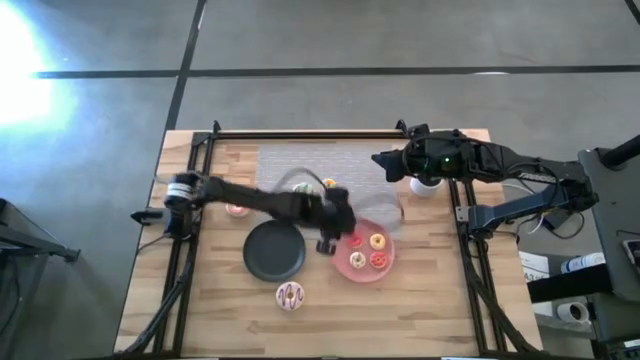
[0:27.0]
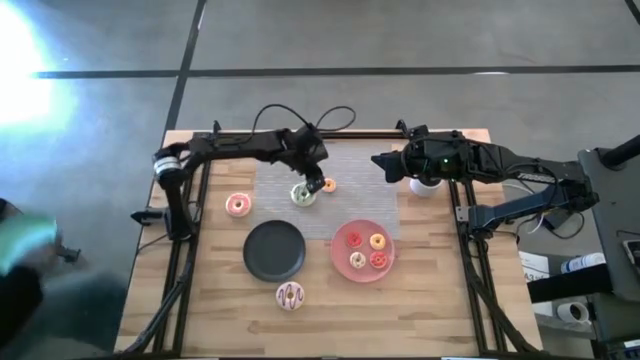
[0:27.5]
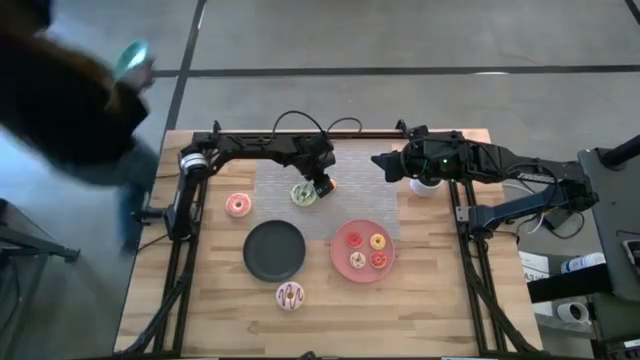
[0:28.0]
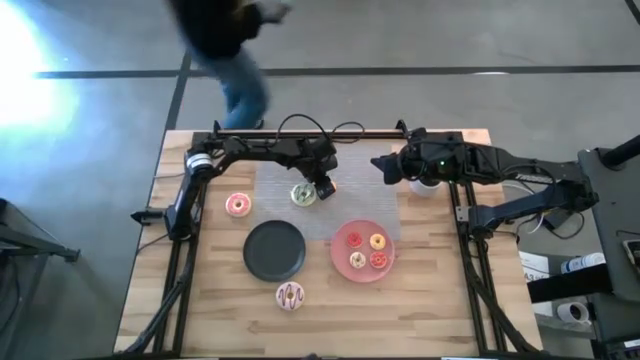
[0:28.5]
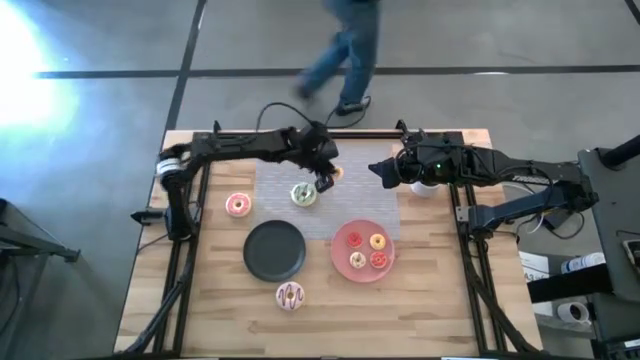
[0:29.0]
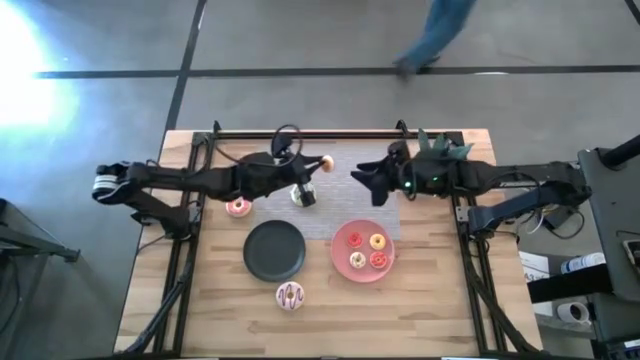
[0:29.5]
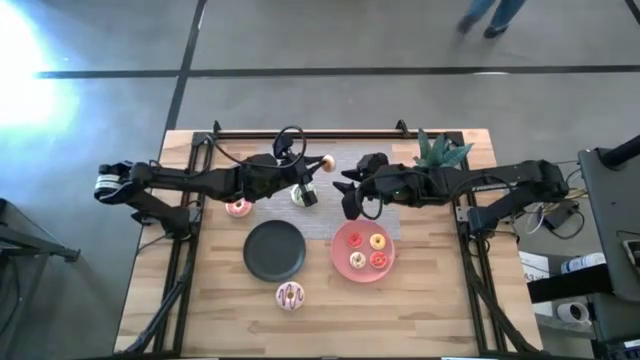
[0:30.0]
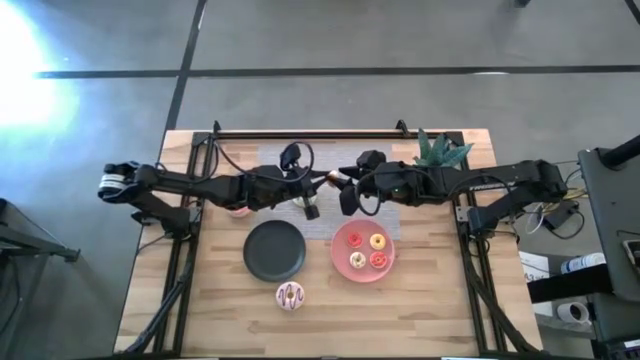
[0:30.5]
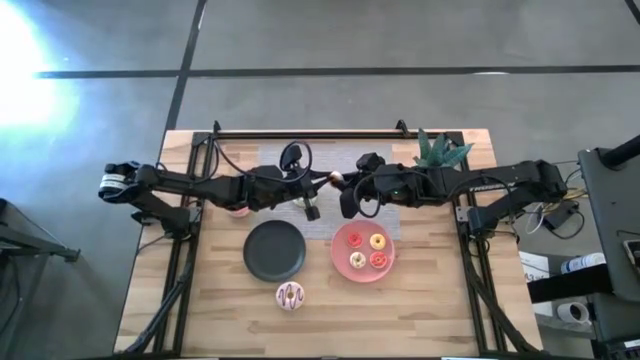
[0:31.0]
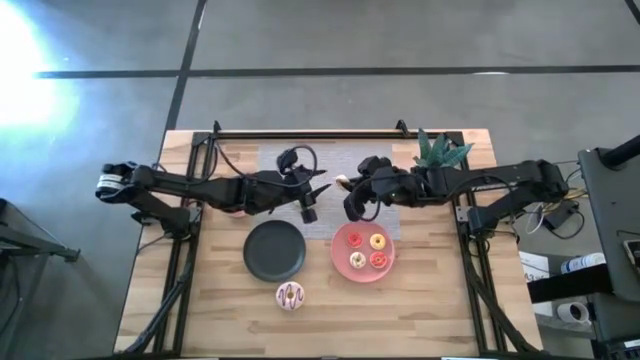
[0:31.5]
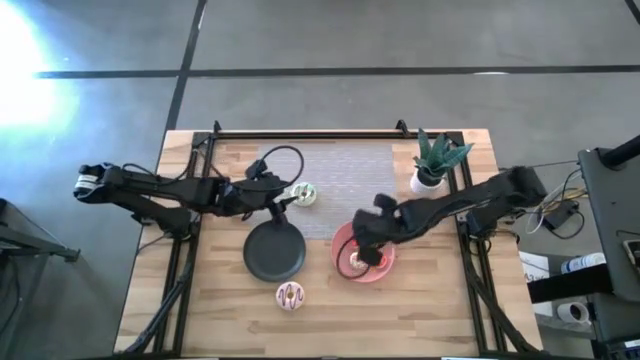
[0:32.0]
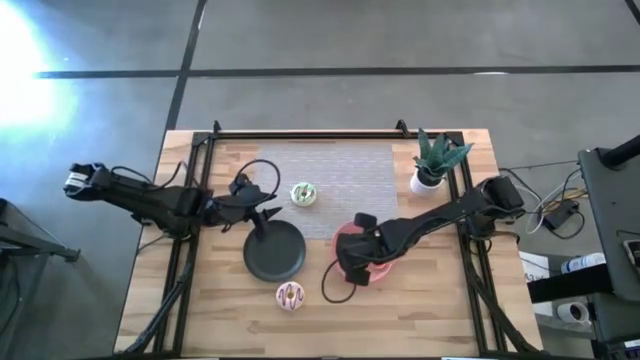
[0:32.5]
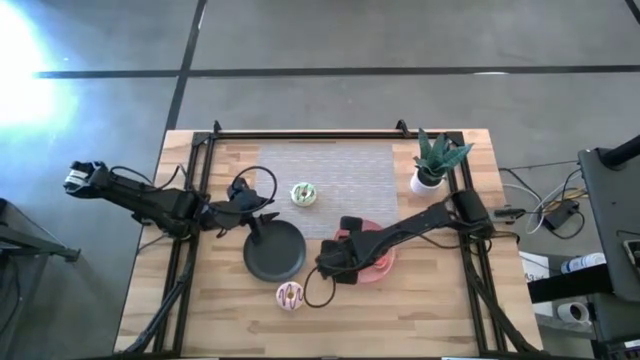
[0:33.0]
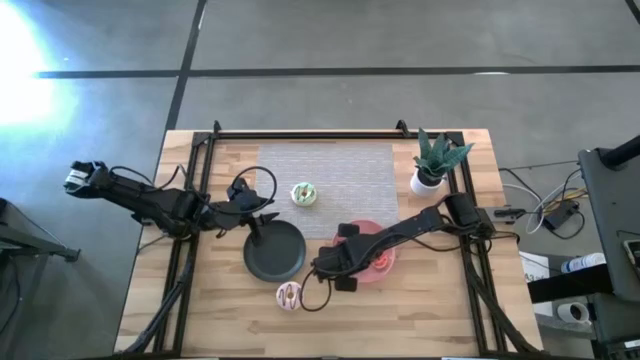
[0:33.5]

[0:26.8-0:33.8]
Task: Pick & Place donuts
Put the small blue donut on the pink plate

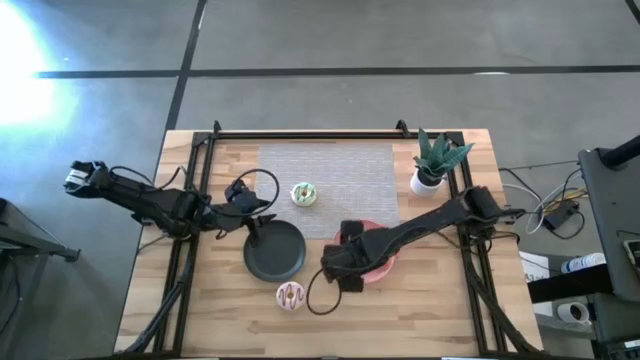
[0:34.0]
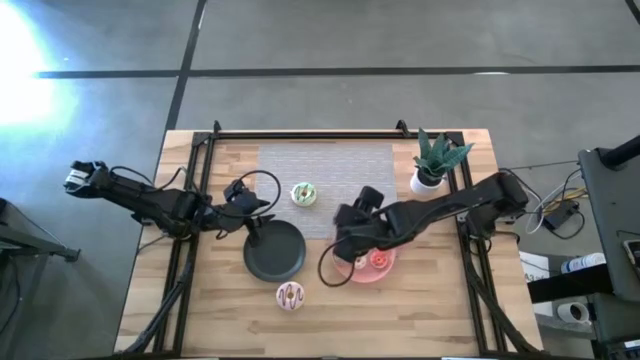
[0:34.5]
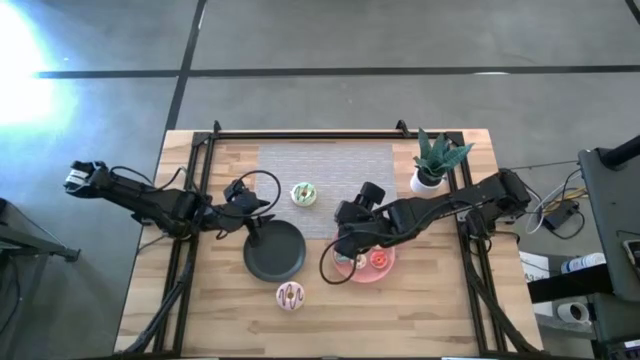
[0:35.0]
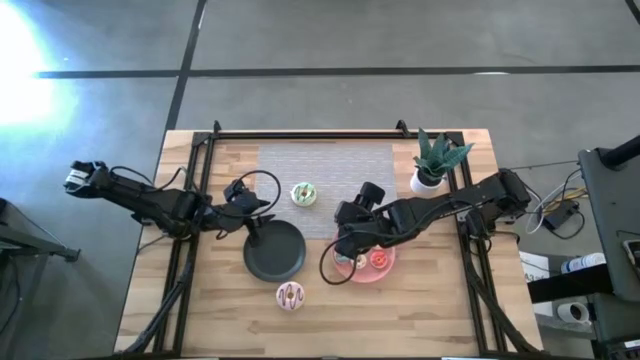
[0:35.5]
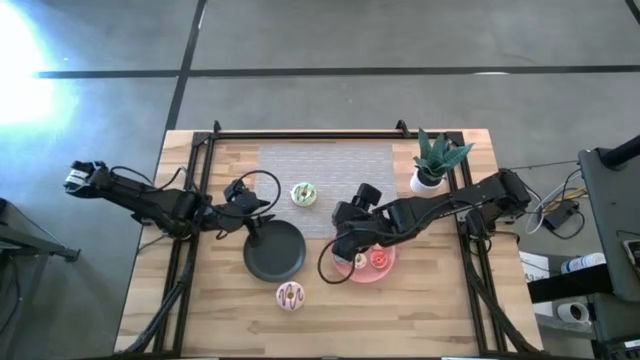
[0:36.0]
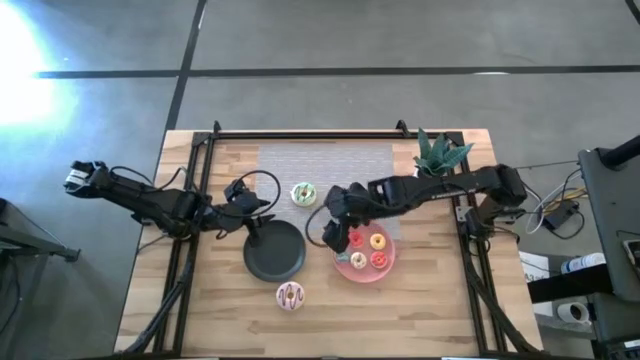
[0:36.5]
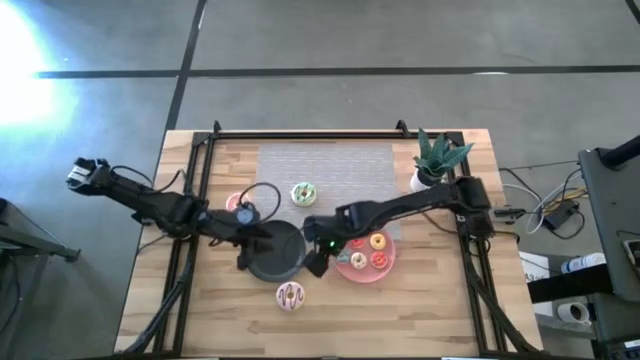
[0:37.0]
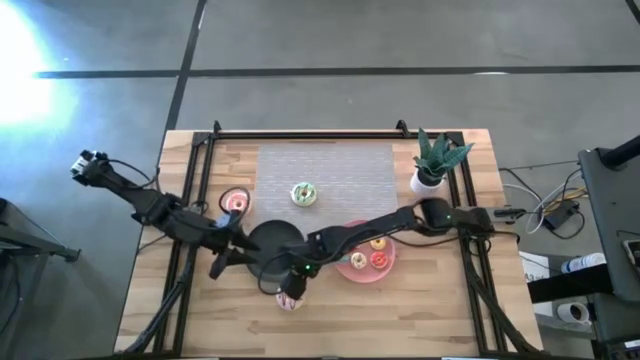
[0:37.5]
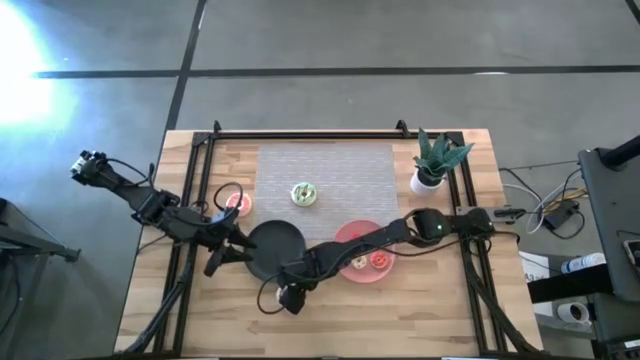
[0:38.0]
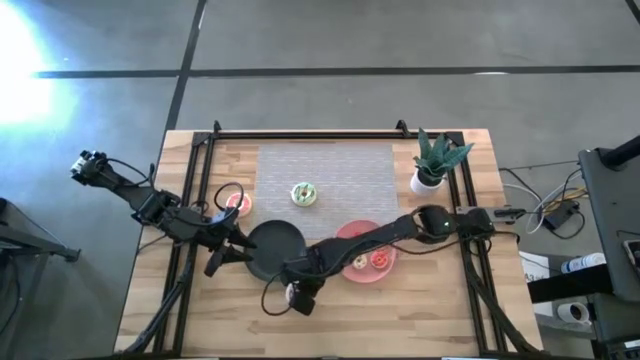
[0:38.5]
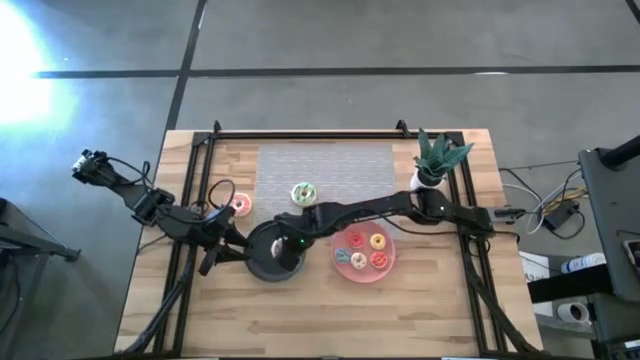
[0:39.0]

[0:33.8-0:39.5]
Put the big violet donut on the black plate

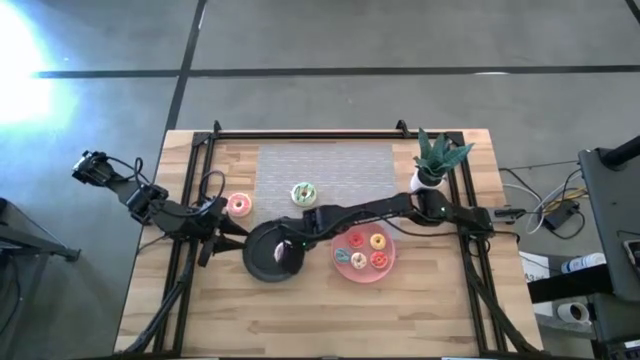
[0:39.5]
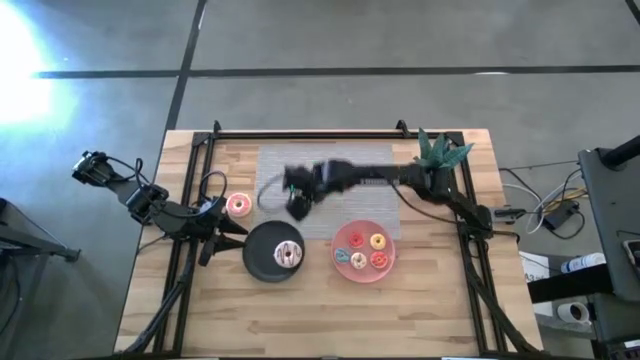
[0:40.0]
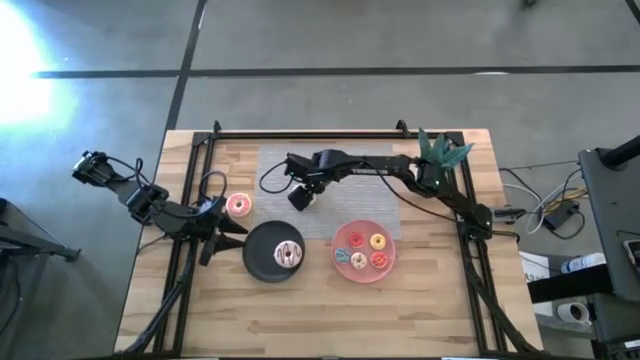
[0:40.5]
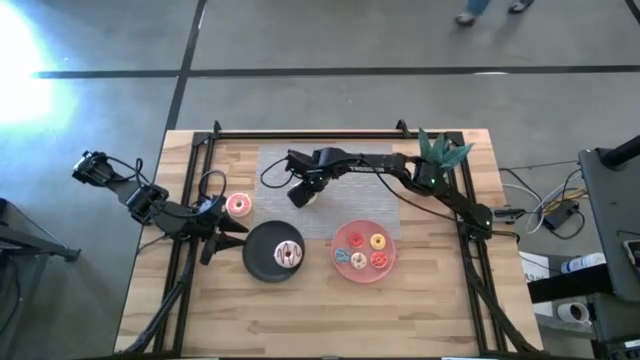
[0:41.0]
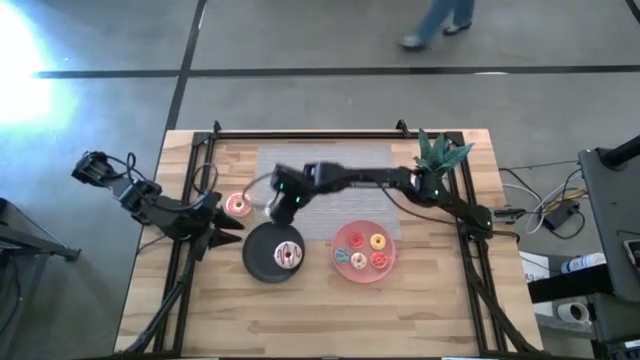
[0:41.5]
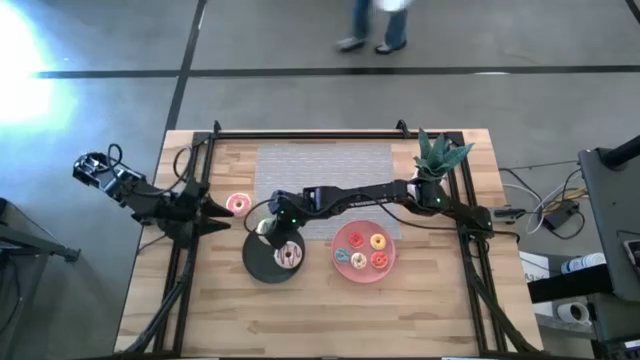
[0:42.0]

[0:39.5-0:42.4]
Put the big light green donut on the black plate

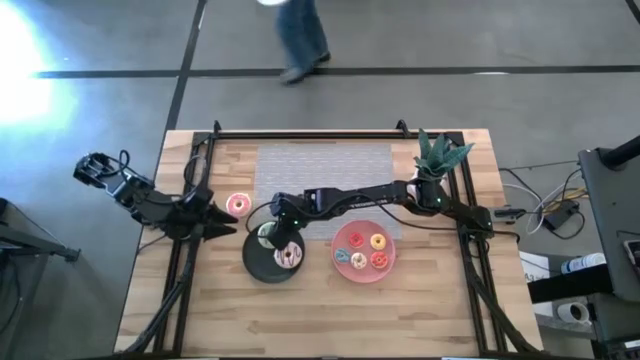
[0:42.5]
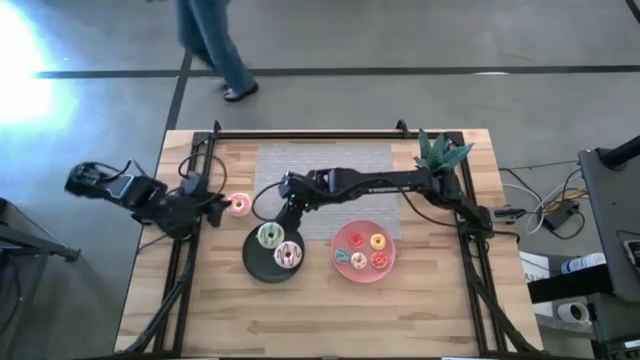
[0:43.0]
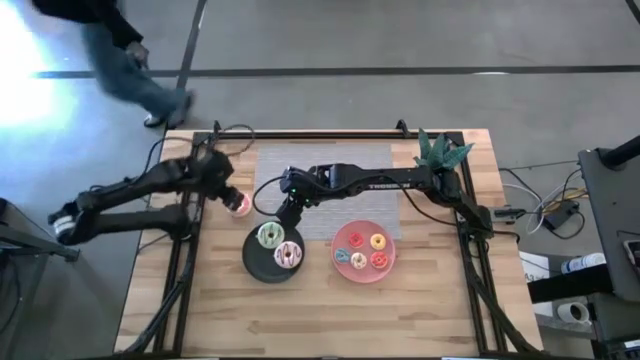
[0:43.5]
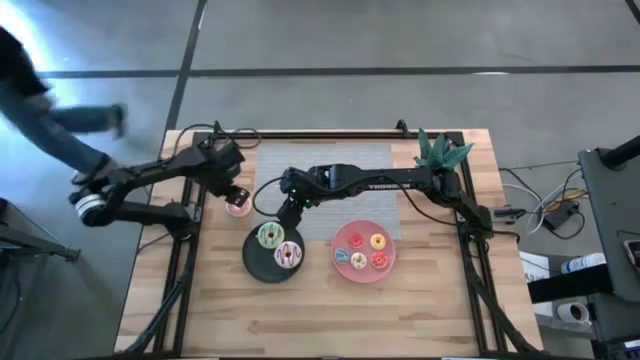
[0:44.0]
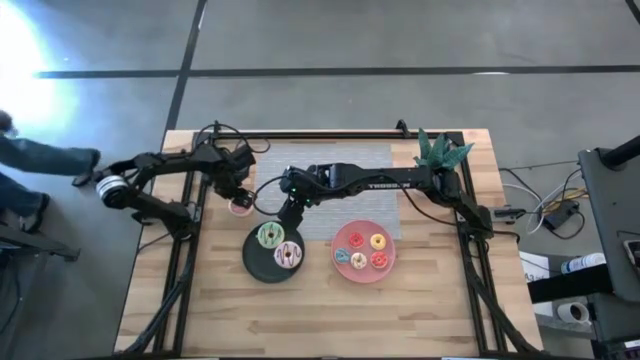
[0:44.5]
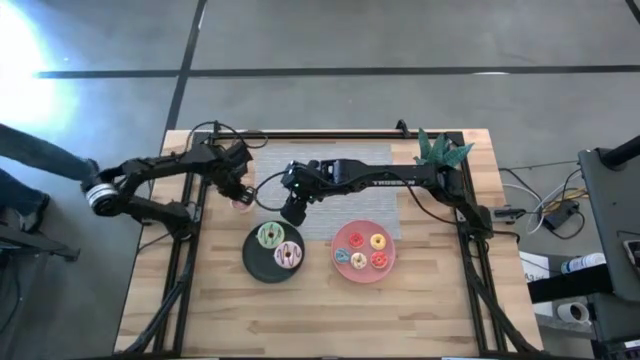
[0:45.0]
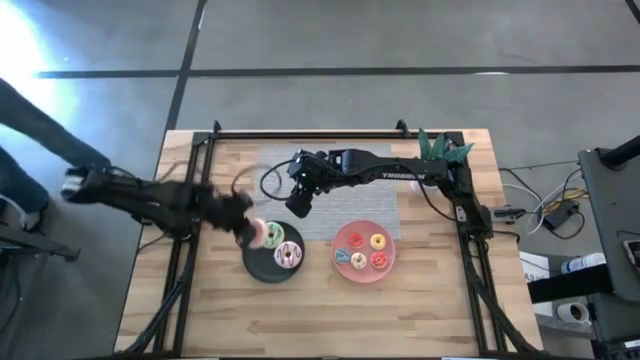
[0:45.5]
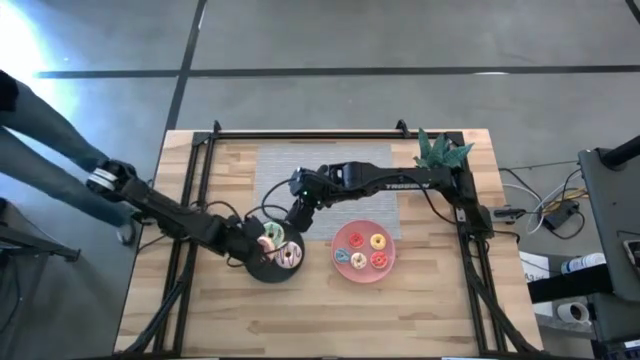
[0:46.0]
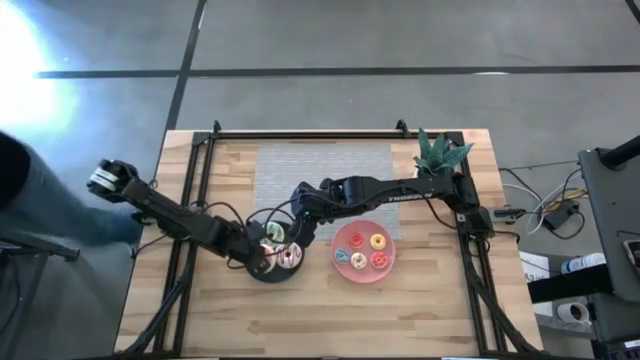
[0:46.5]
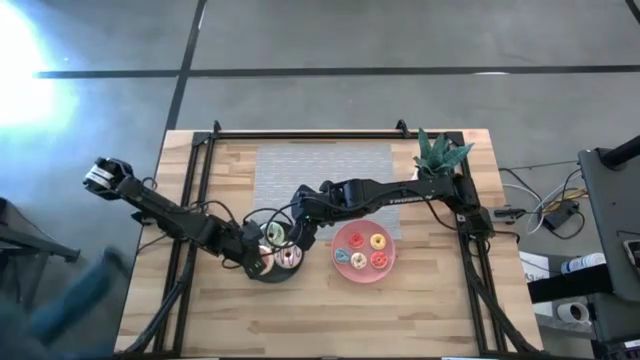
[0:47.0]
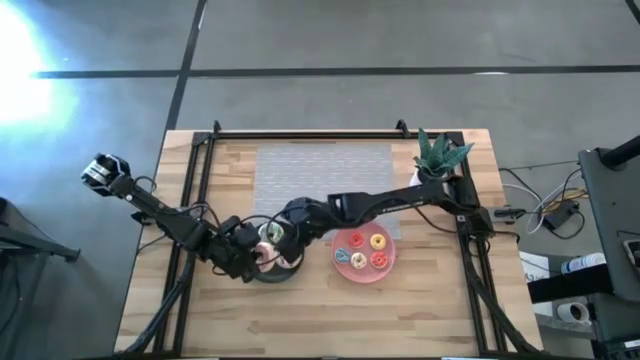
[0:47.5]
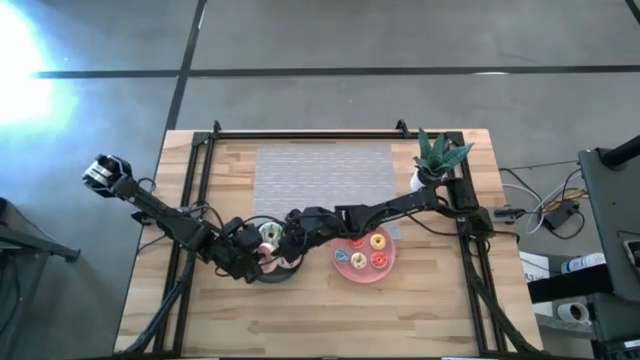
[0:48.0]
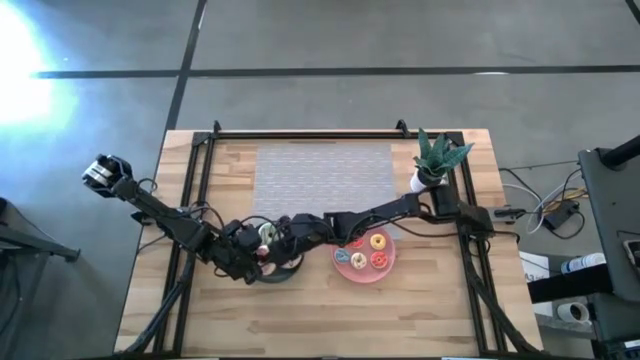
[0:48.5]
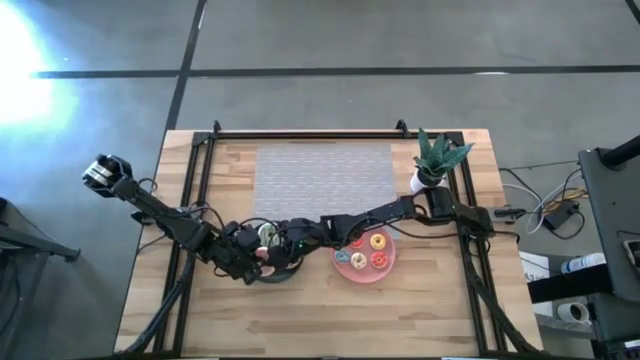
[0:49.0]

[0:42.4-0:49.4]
Put the big pink donut on the black plate
